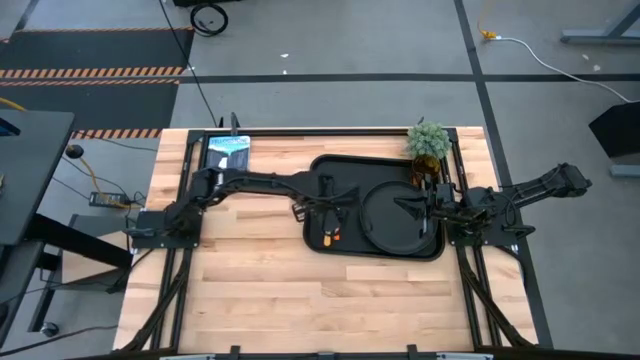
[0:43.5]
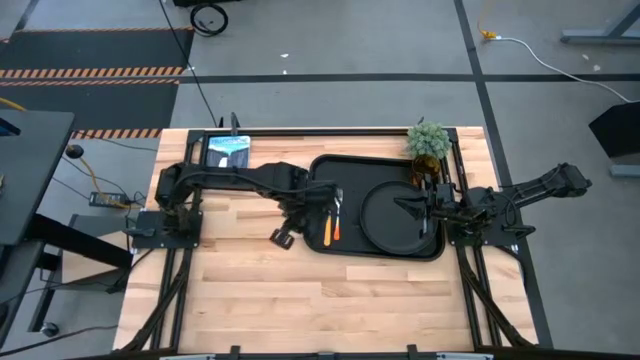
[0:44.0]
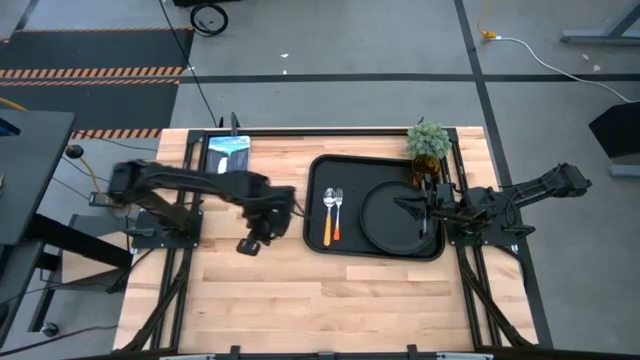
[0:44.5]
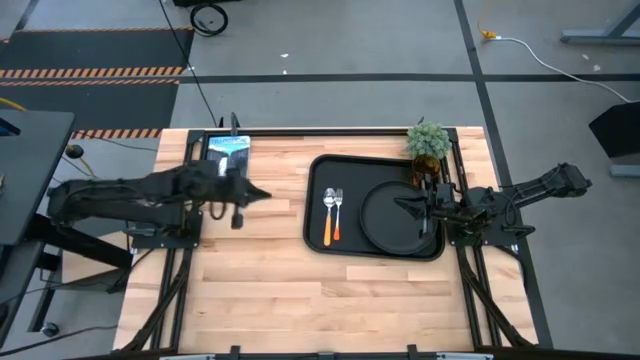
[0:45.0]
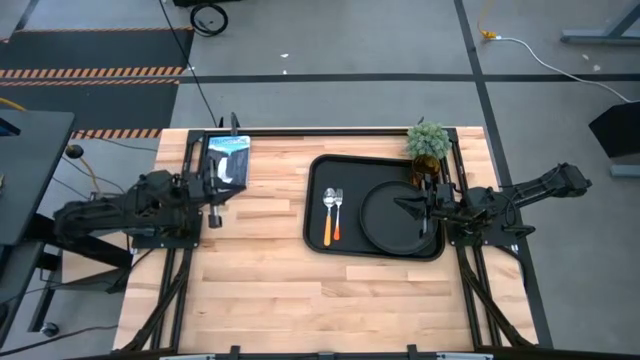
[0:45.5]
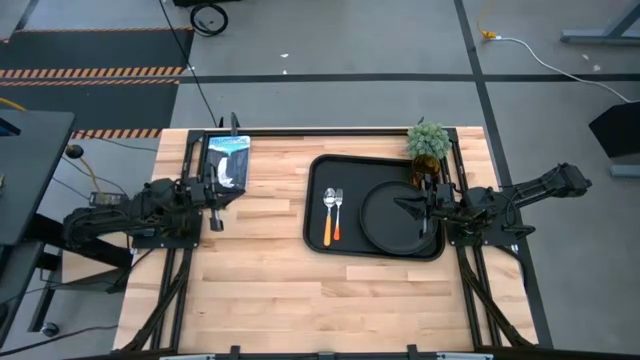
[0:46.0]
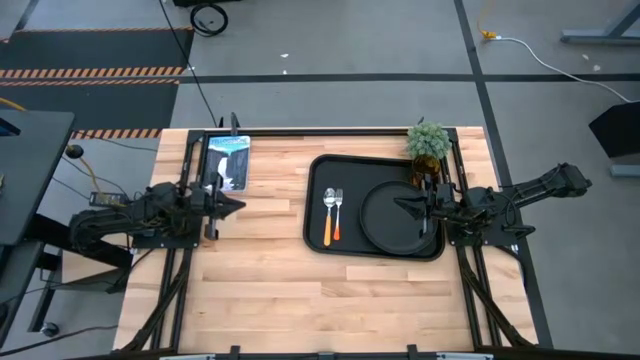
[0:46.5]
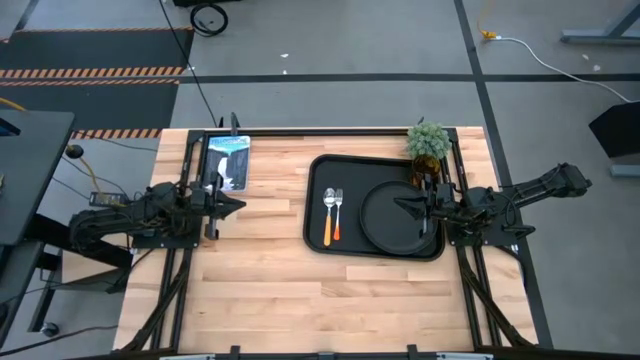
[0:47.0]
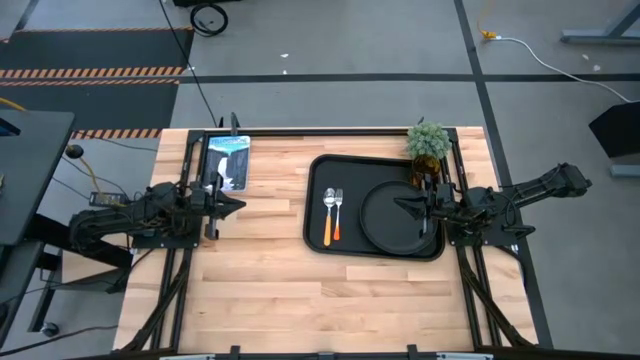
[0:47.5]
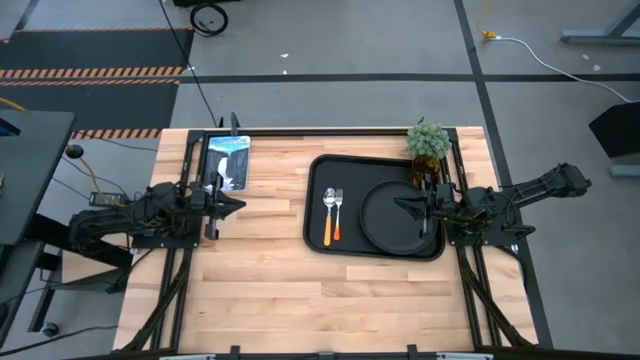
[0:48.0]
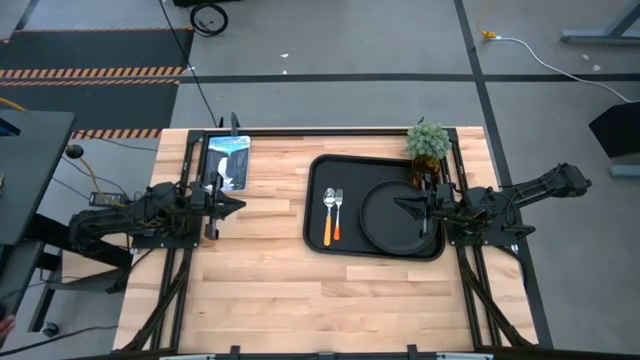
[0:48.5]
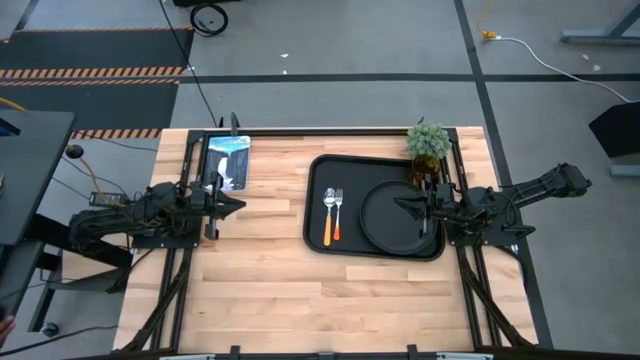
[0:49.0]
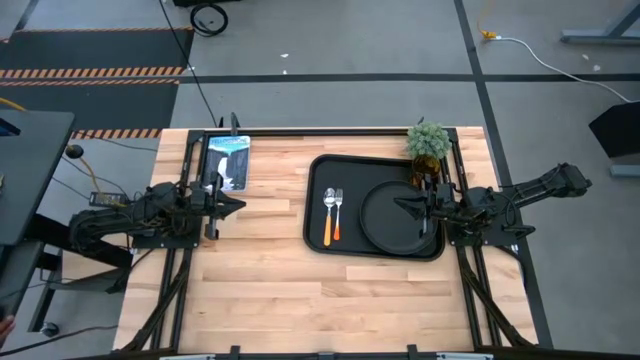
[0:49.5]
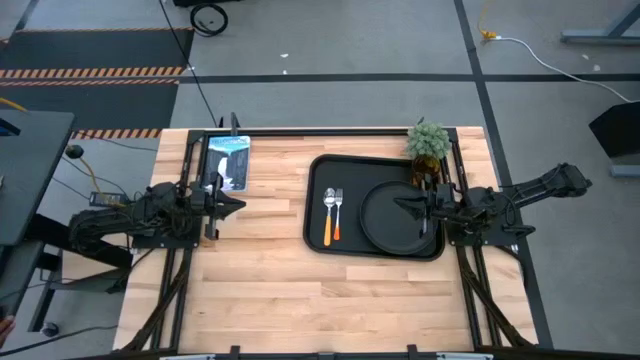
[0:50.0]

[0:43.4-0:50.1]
Task: Pick and place plate/cup/fork/spoon on tray
Return to Home Position

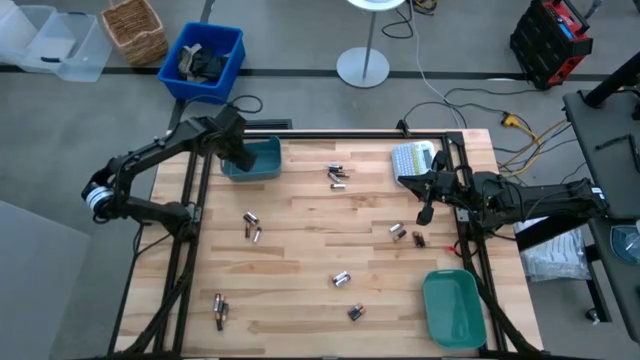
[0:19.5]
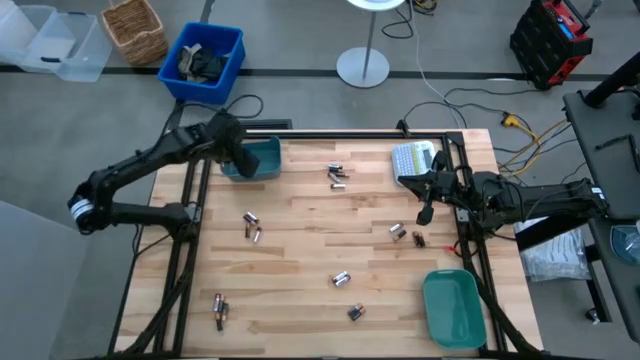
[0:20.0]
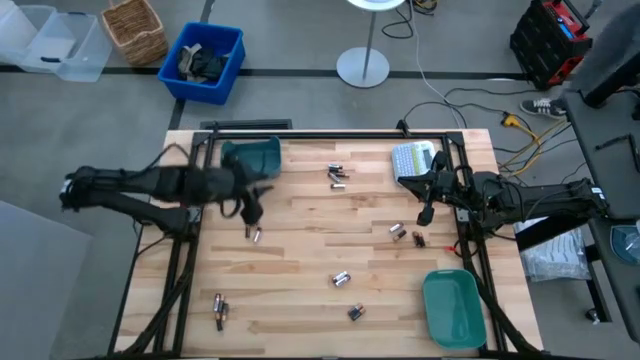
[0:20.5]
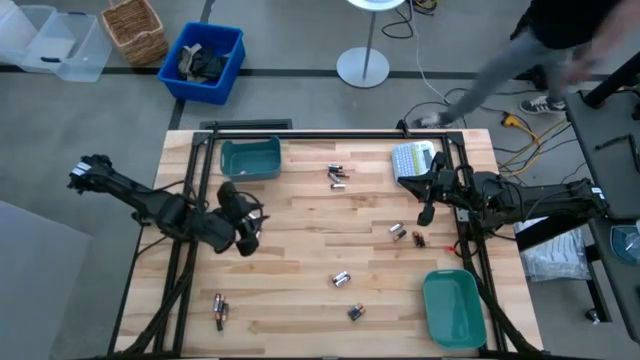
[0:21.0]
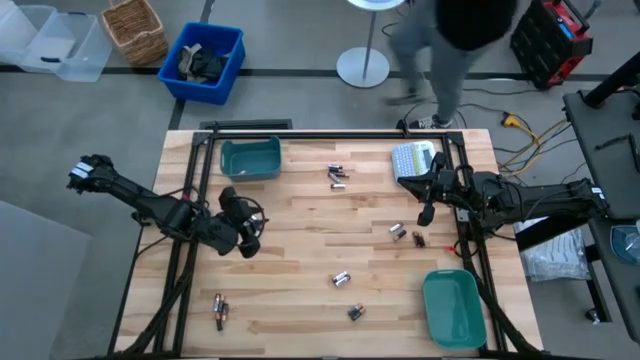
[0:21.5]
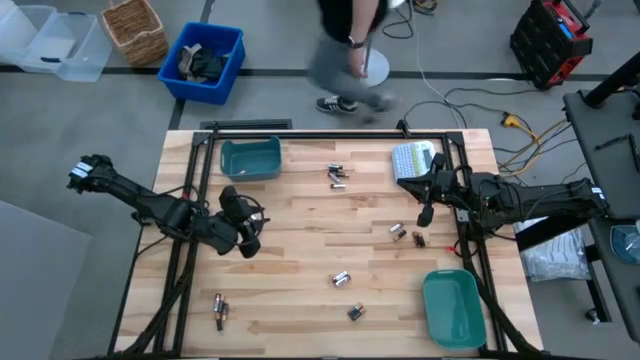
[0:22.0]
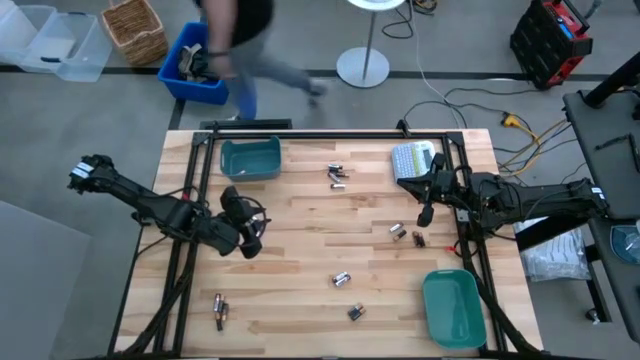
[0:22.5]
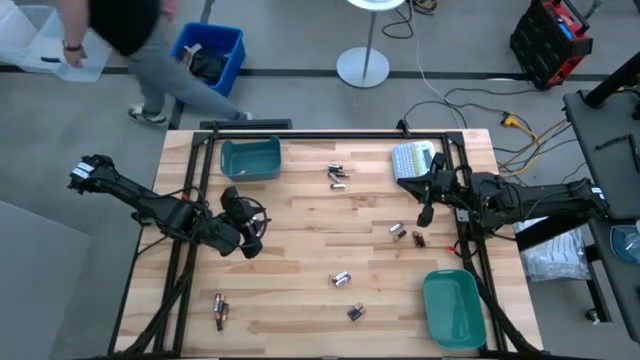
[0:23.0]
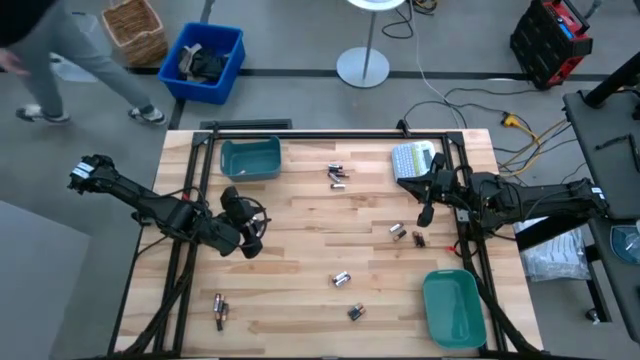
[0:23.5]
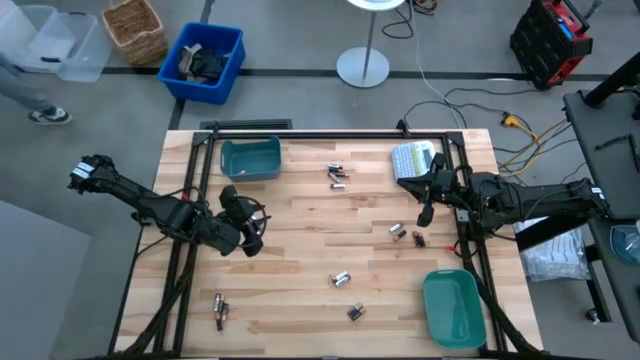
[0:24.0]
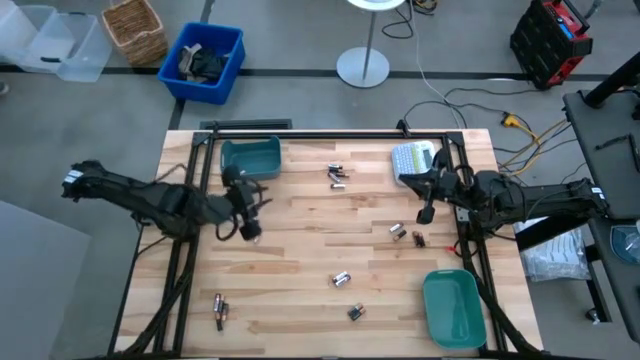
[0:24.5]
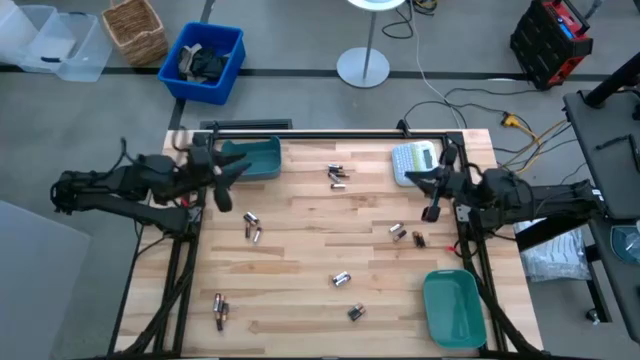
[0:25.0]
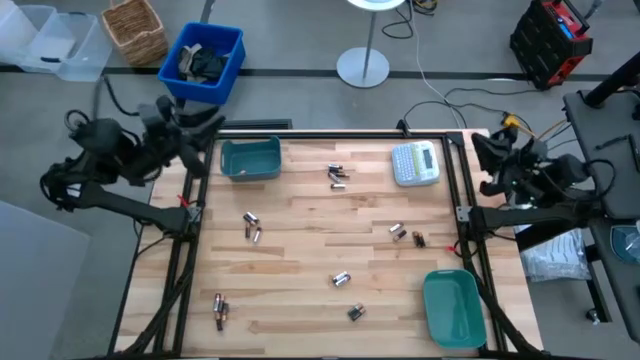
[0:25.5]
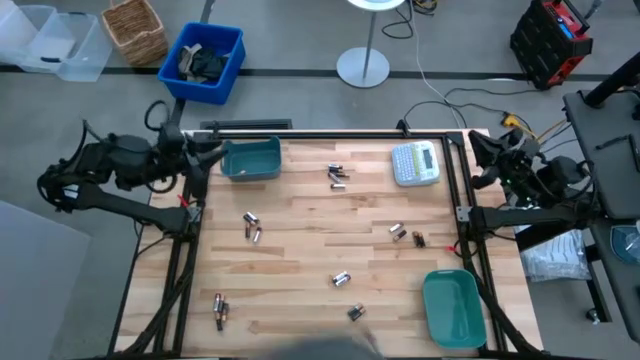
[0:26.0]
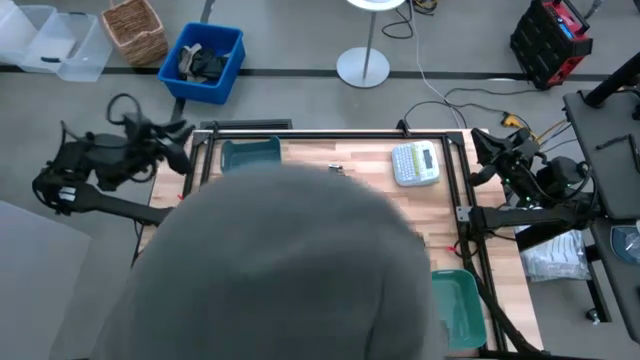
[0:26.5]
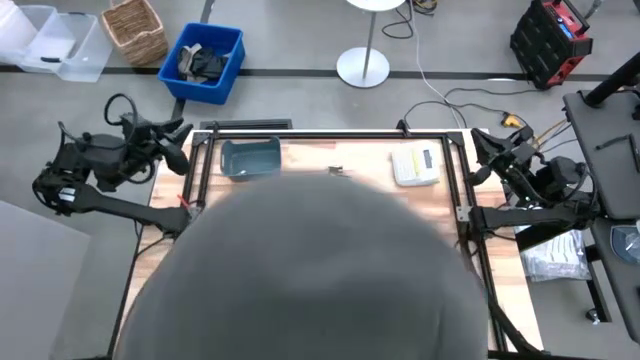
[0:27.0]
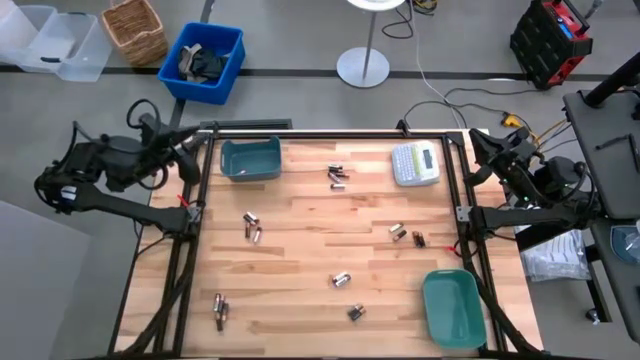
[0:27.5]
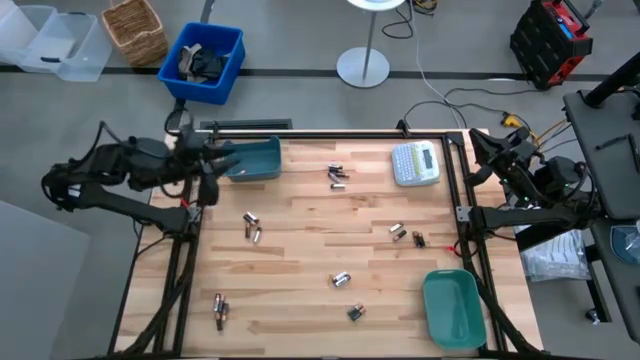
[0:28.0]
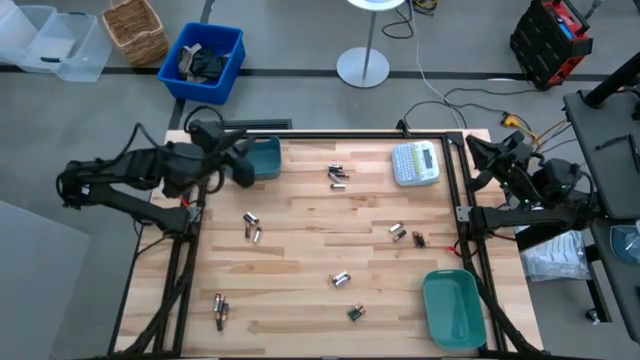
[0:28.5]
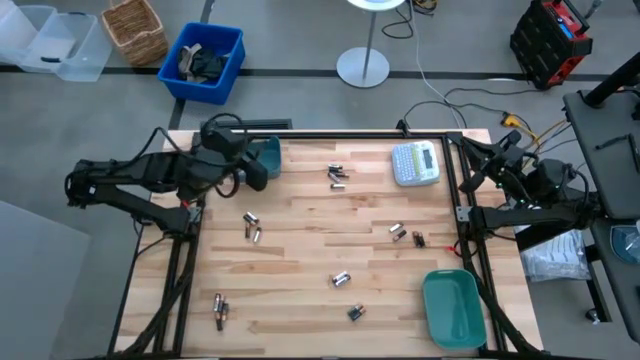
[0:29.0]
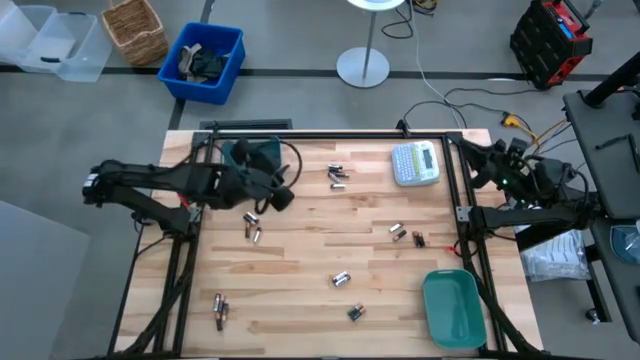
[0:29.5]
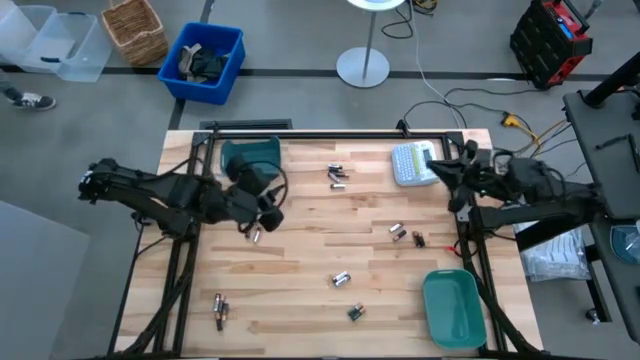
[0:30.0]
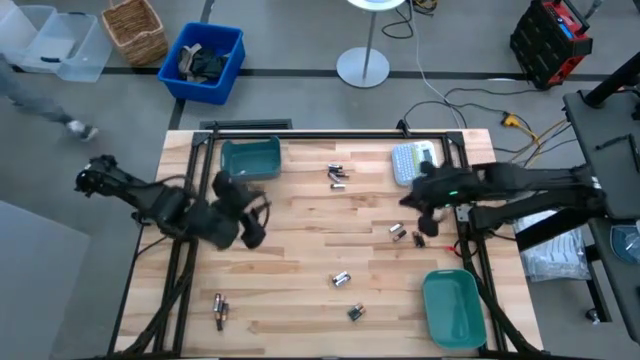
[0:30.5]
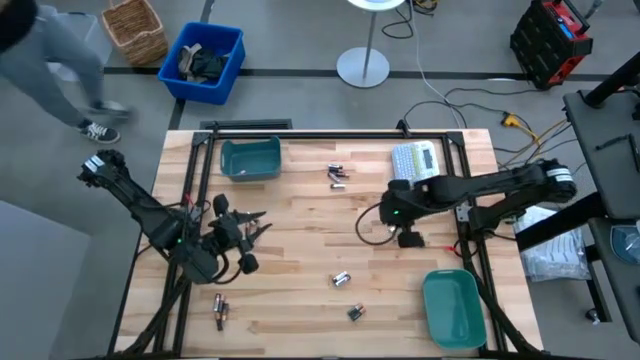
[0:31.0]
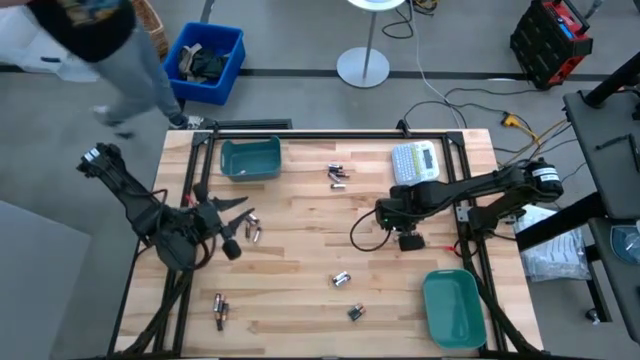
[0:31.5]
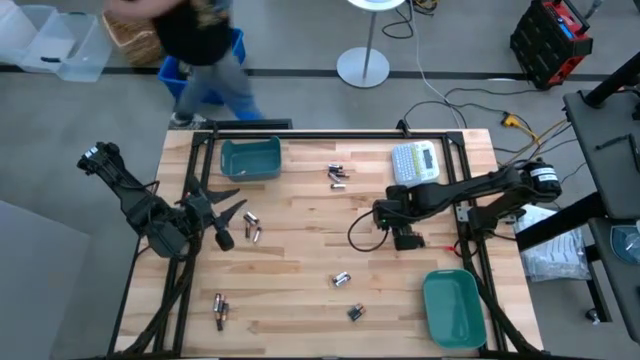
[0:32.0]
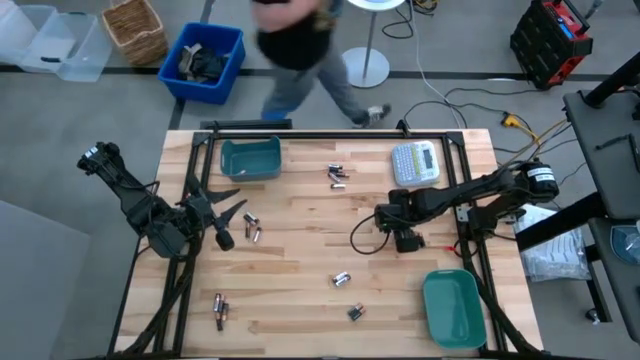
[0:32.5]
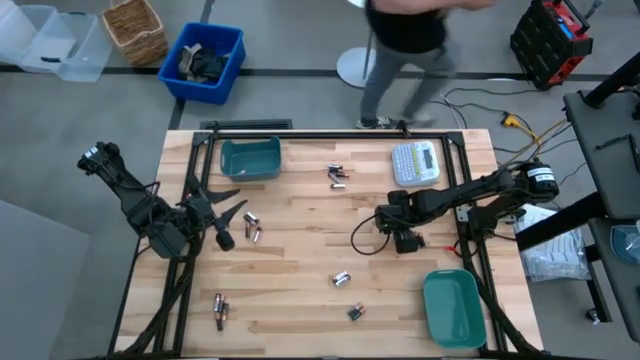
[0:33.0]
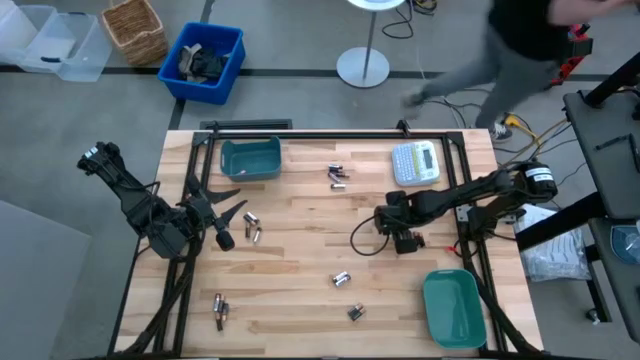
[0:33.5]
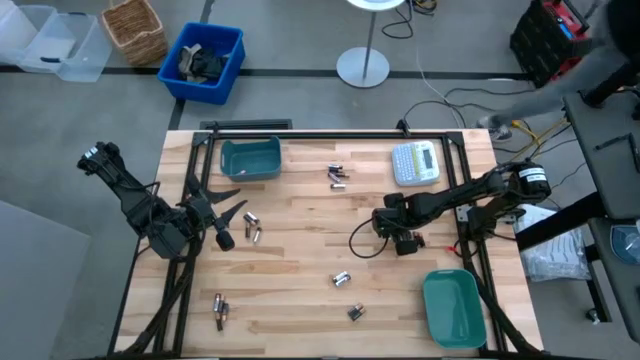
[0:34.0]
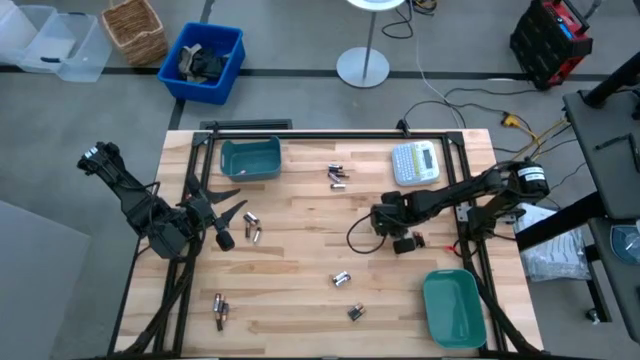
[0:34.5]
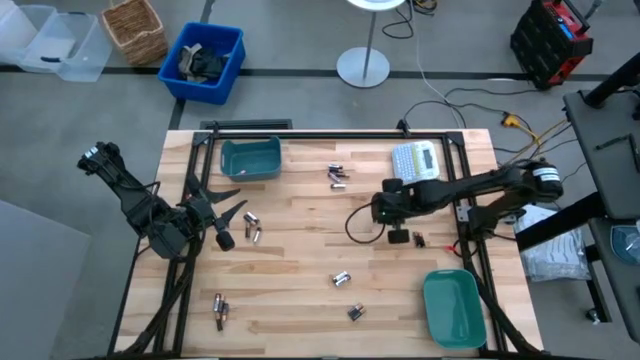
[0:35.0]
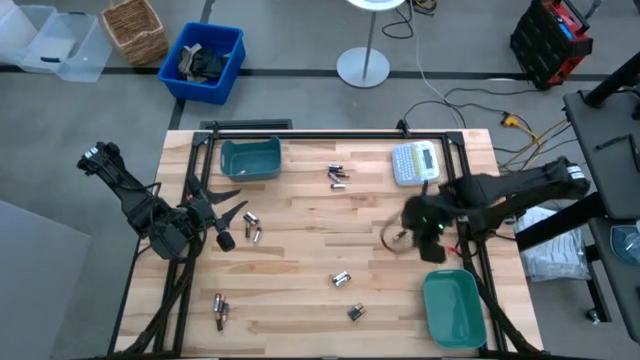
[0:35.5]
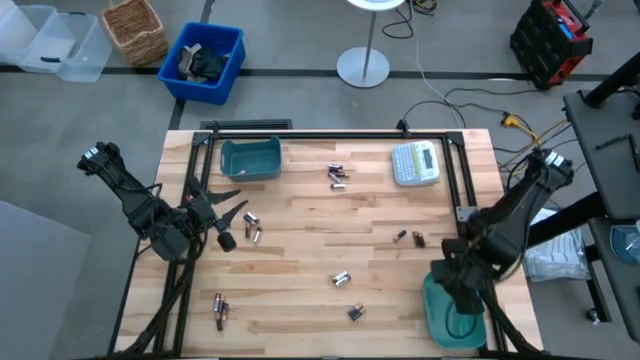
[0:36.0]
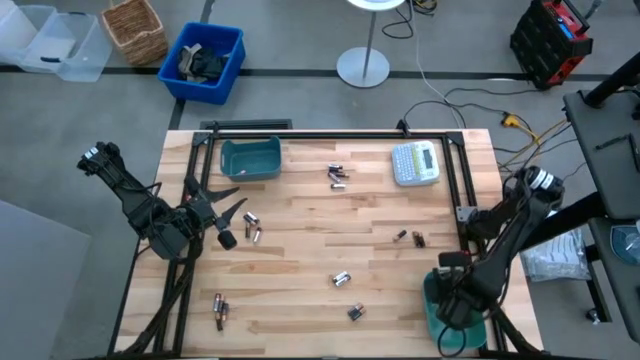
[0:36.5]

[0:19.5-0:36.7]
Task: Sort batteries
Put the silver battery into the green bin
